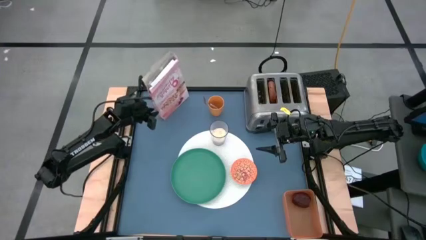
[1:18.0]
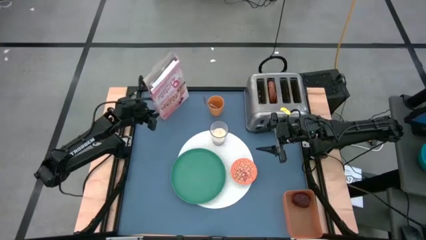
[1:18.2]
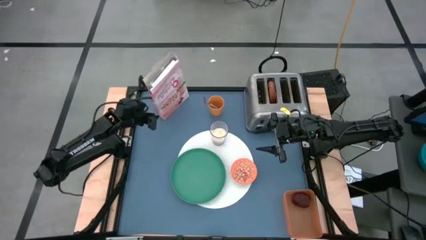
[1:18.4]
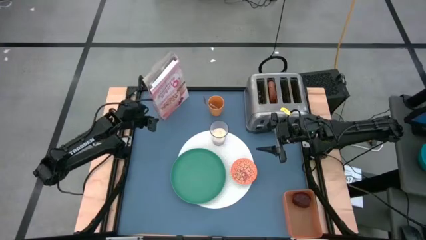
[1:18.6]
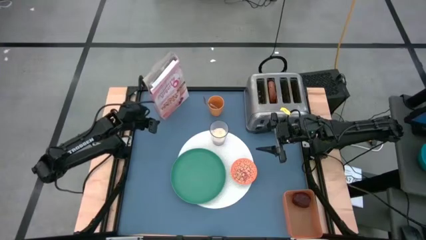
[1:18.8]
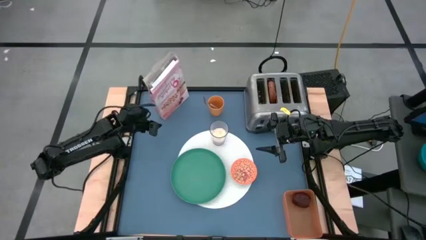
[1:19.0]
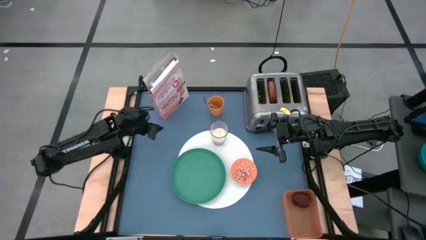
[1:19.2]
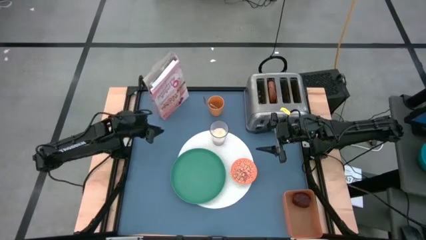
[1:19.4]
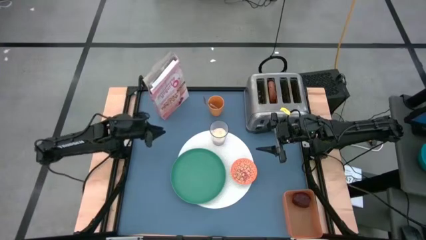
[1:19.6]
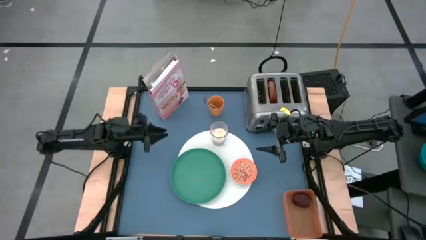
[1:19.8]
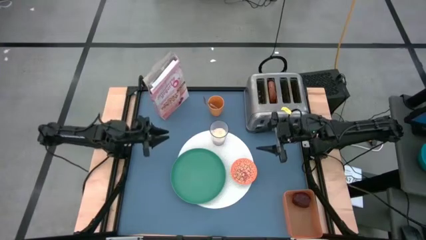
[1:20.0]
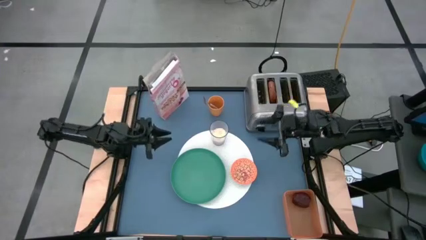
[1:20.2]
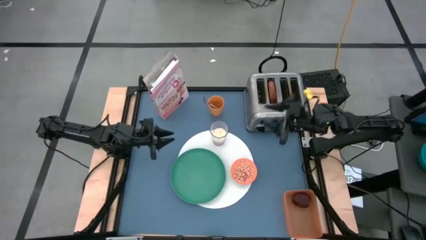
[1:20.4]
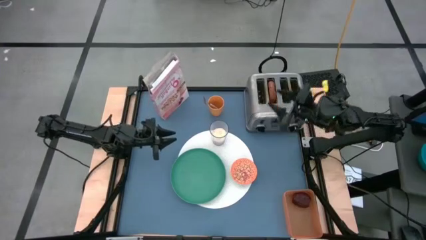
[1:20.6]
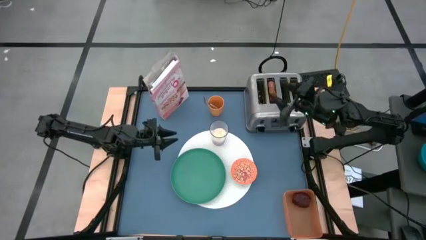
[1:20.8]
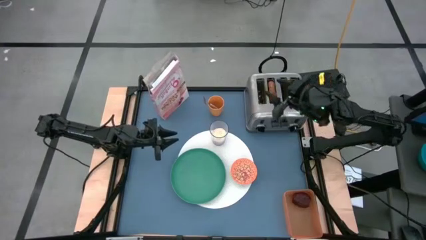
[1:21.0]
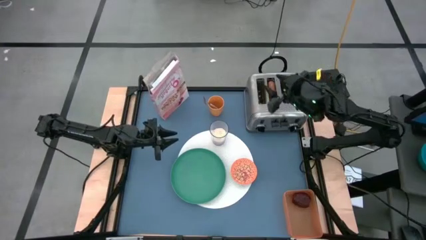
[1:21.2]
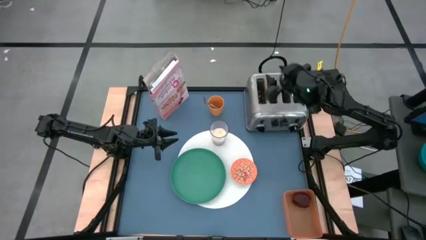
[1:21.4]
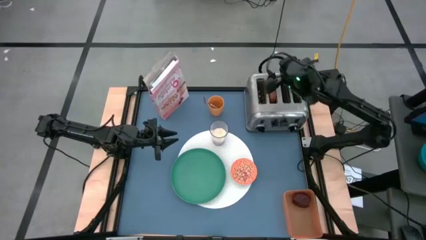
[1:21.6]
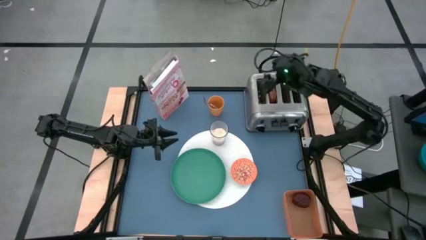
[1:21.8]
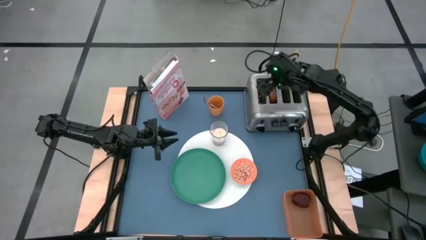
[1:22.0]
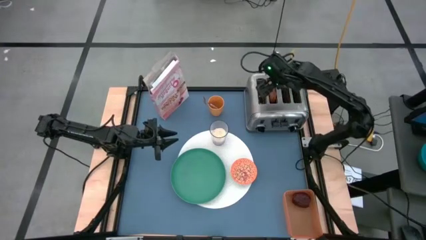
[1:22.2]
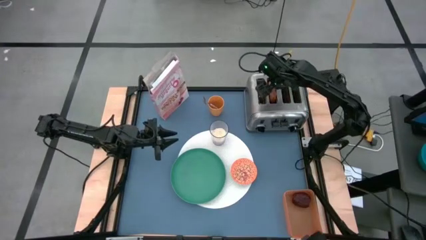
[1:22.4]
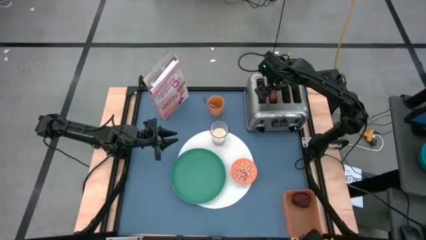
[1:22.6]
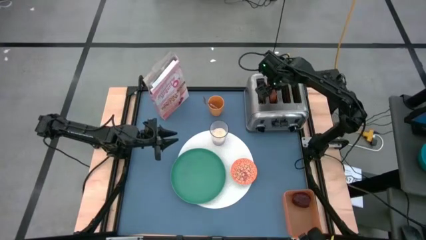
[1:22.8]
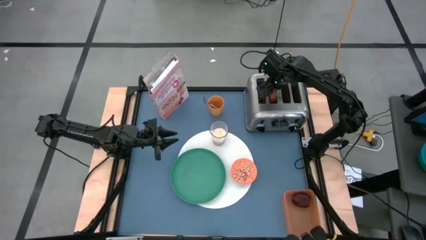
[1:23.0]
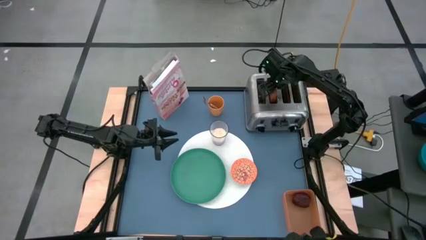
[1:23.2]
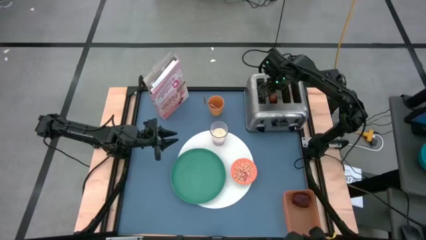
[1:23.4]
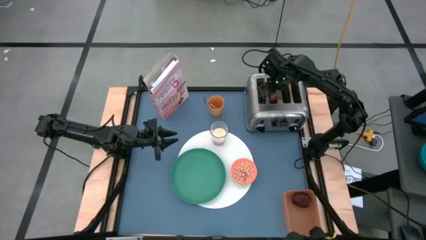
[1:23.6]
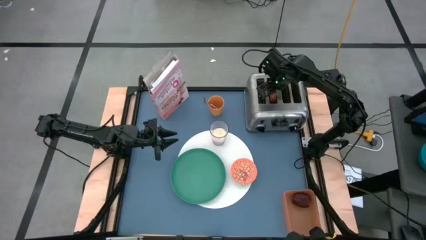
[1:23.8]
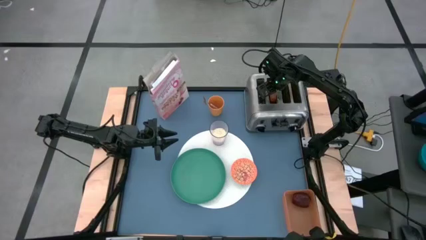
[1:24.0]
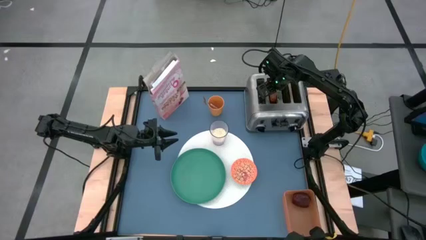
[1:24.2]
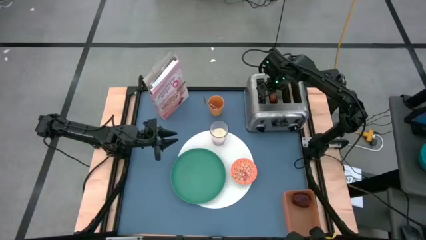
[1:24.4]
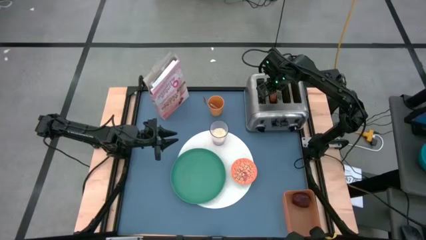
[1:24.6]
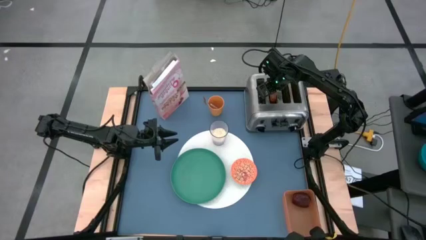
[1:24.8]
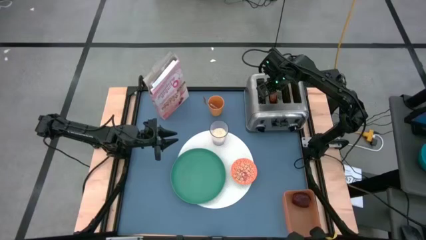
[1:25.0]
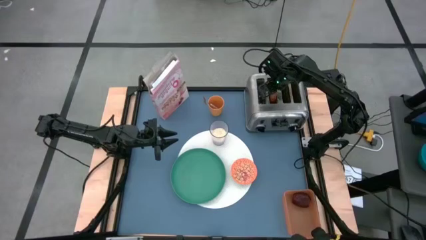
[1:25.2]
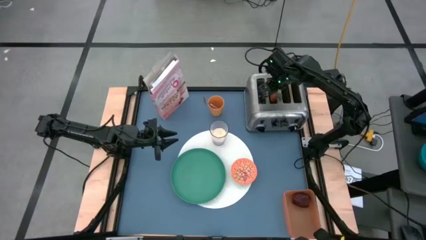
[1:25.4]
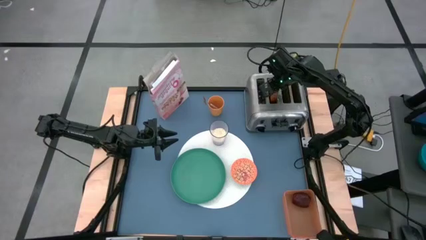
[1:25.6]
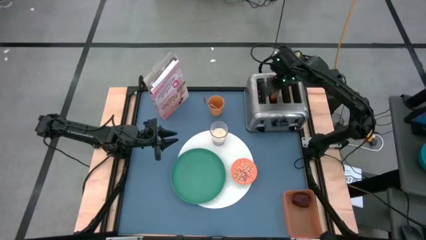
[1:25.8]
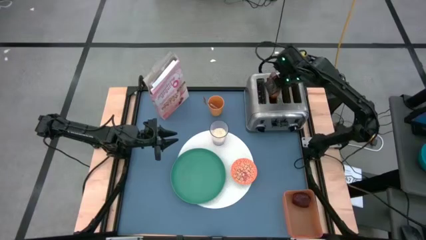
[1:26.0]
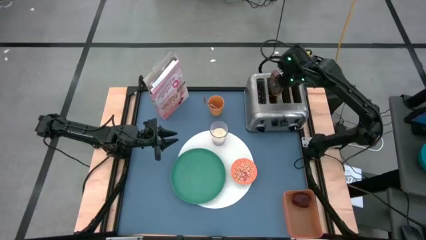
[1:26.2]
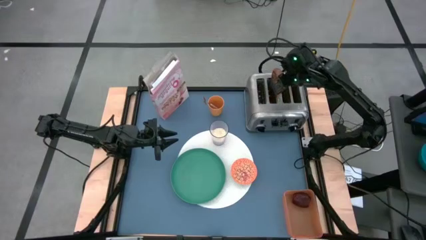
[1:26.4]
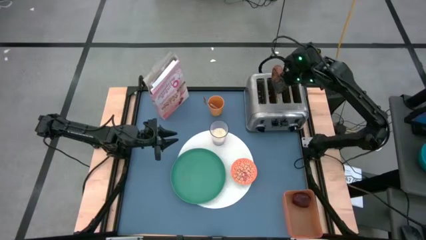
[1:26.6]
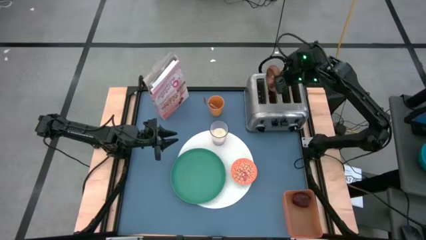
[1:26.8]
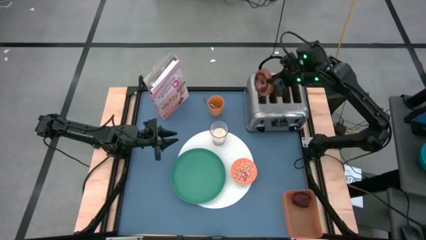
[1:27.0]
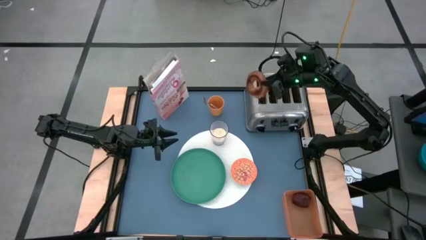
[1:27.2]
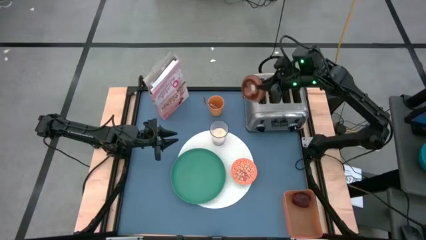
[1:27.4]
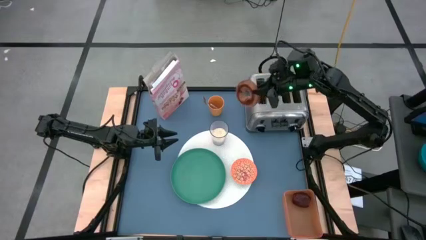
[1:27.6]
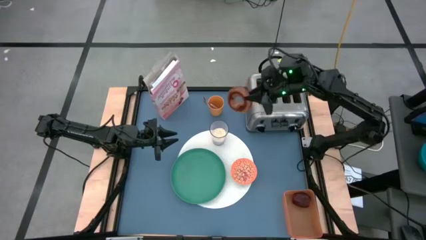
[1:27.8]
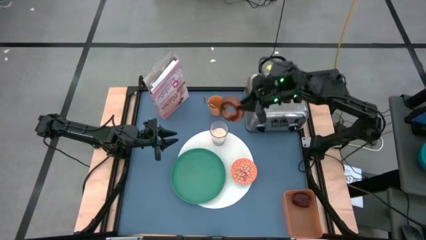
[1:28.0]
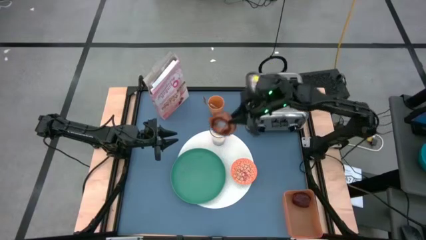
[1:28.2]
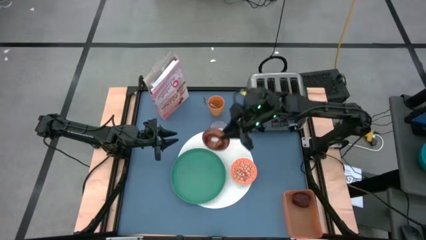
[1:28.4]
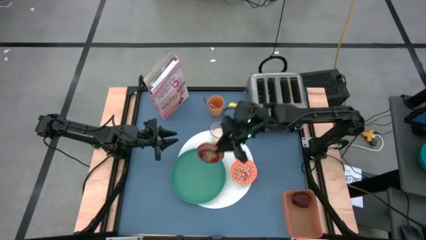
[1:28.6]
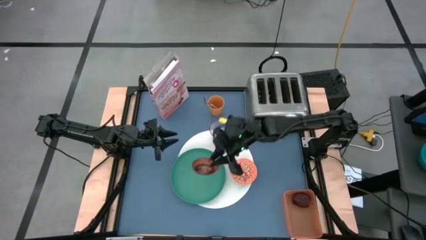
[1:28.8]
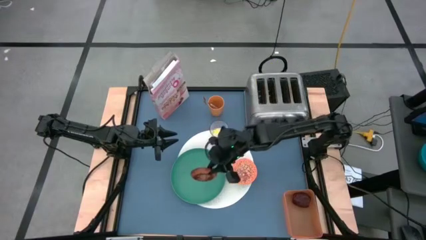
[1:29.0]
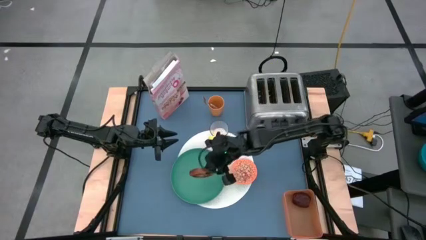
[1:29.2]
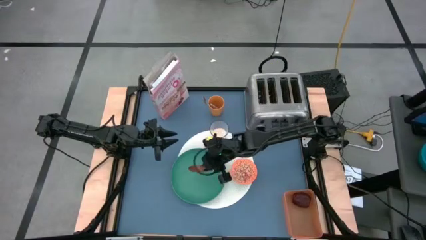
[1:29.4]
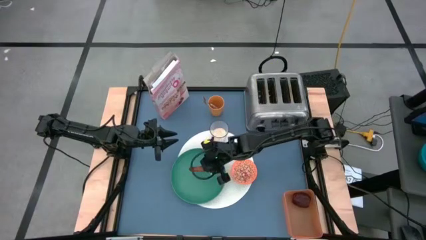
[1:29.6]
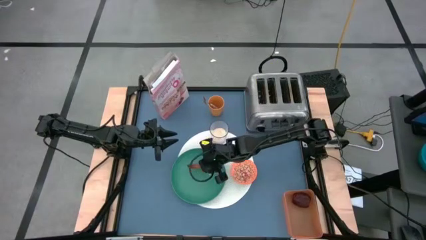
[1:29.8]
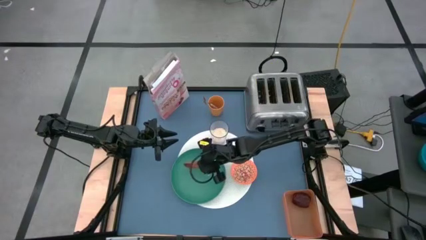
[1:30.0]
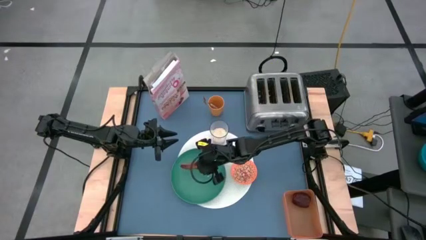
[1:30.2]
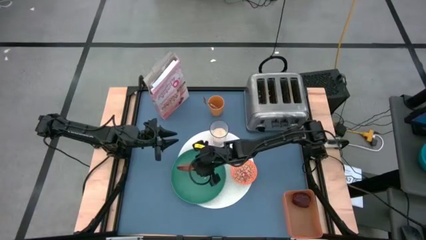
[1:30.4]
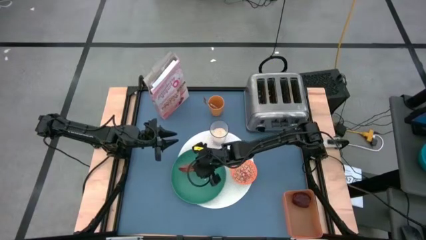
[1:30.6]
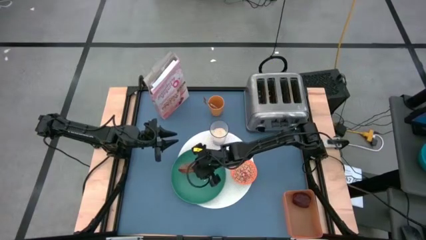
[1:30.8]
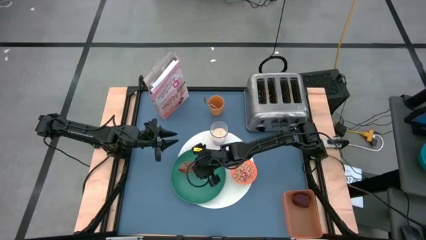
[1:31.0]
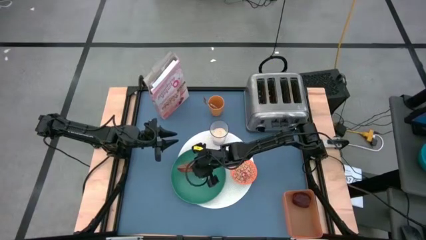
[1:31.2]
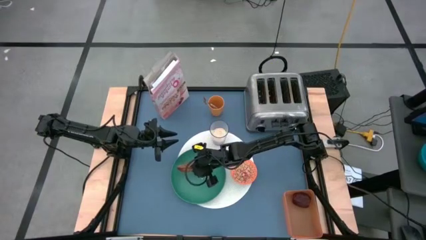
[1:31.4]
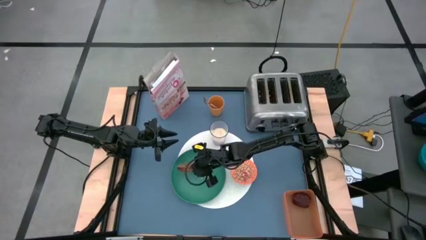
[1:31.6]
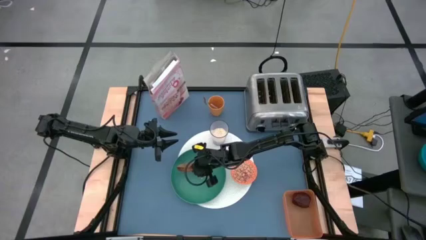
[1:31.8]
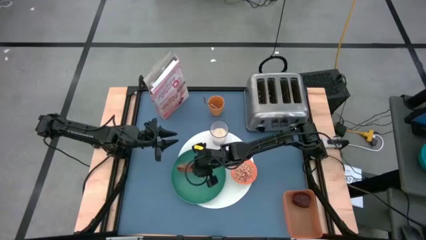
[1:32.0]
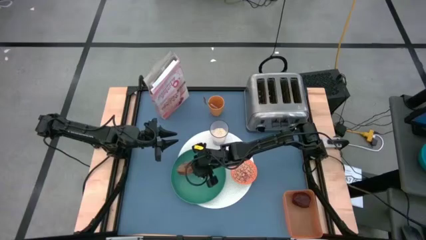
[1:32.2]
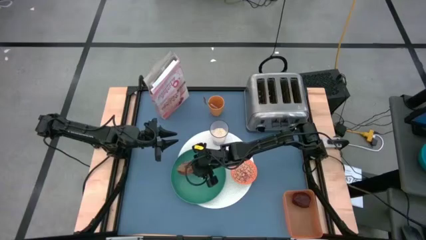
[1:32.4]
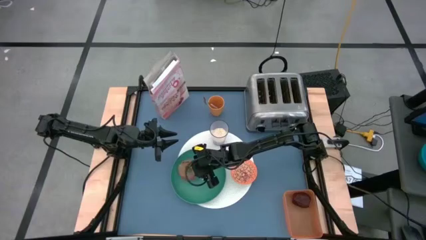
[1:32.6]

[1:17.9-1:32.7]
Task: Arrange a breakfast setting
Put the toasted bagel on the green plate

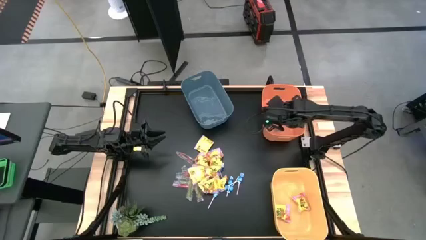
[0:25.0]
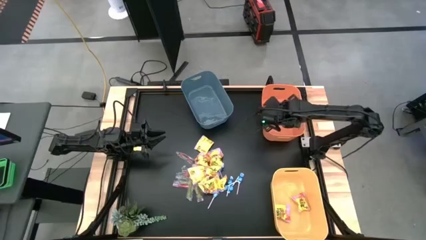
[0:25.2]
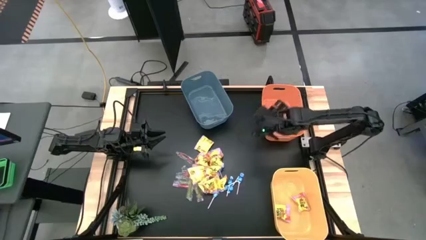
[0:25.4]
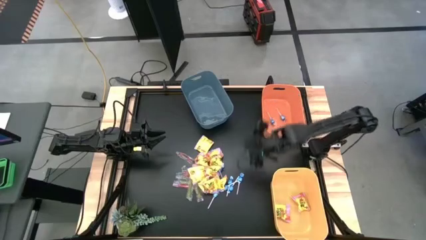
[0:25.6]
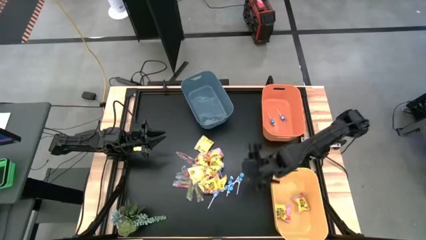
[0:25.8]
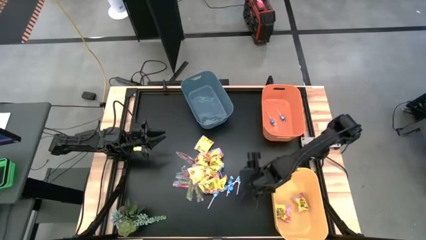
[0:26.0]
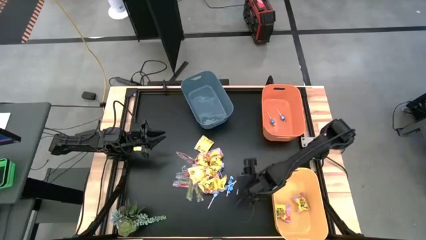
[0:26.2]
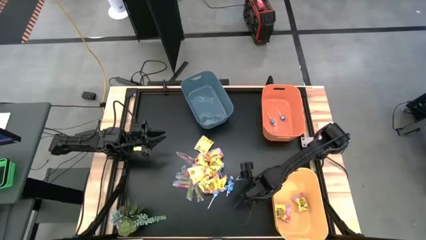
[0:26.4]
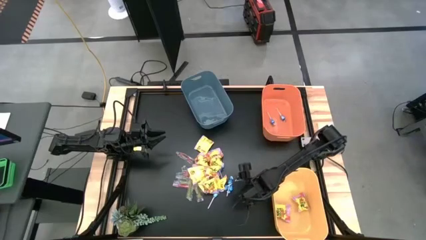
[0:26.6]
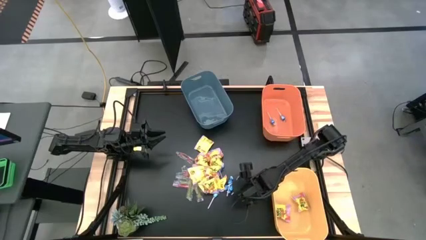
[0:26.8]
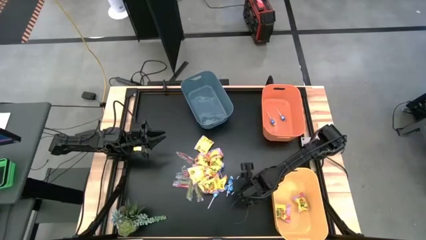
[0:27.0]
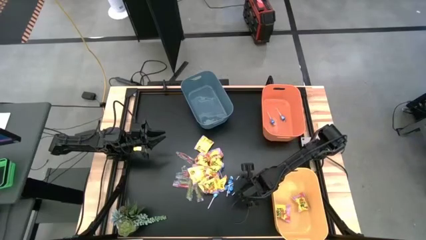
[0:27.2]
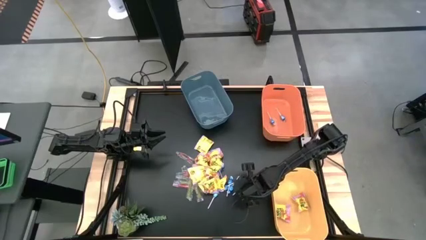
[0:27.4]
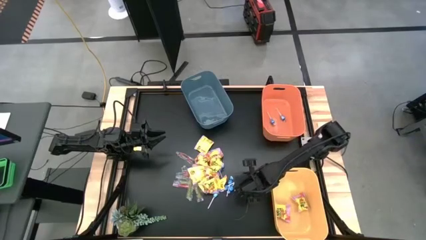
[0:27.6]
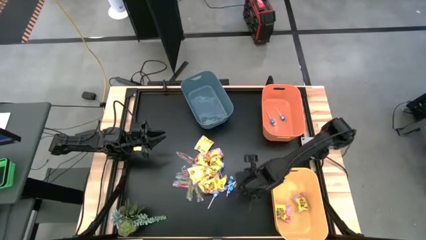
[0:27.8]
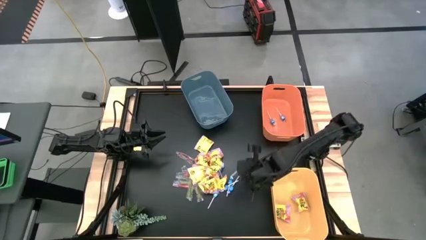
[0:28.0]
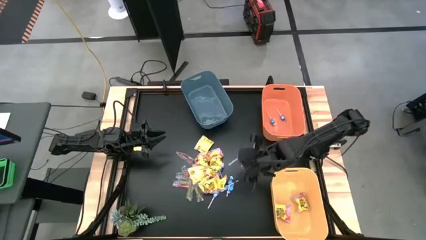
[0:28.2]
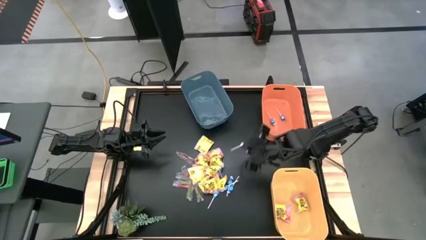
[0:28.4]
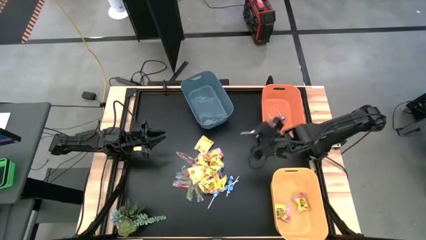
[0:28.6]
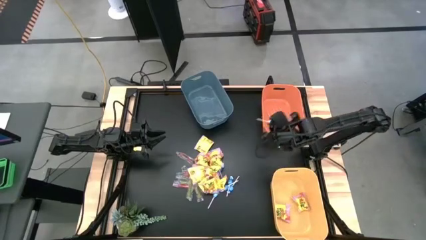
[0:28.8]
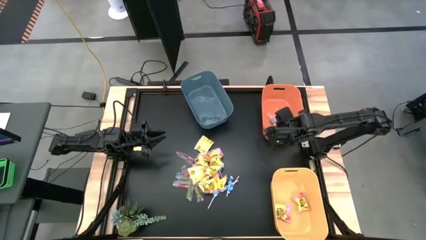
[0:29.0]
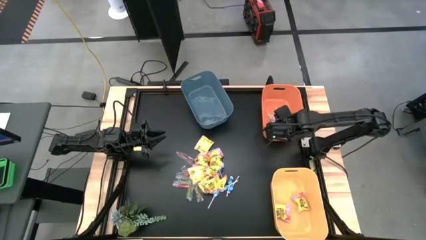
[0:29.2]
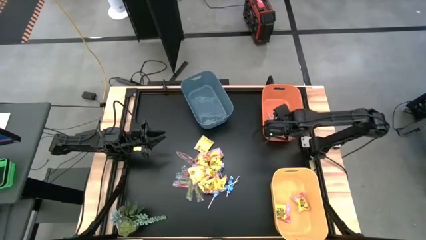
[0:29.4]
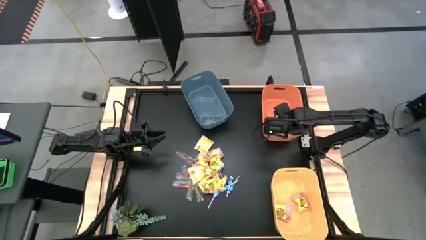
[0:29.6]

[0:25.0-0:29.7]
Task: Sort candy
Put the blue candy into the orange bin
